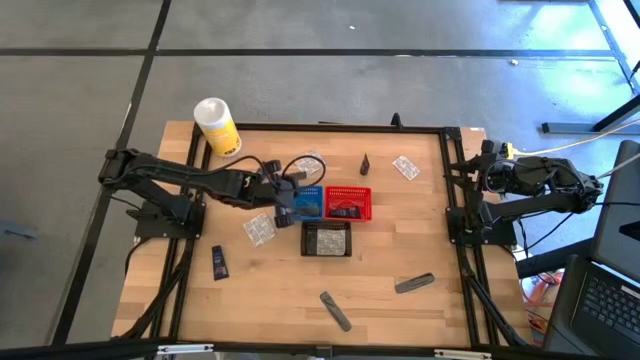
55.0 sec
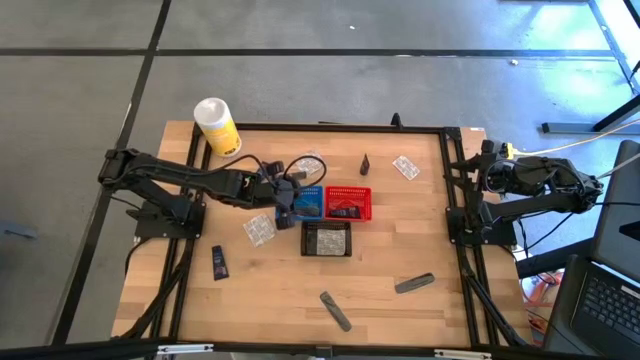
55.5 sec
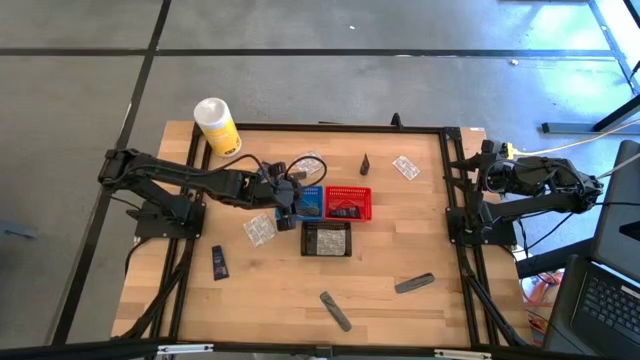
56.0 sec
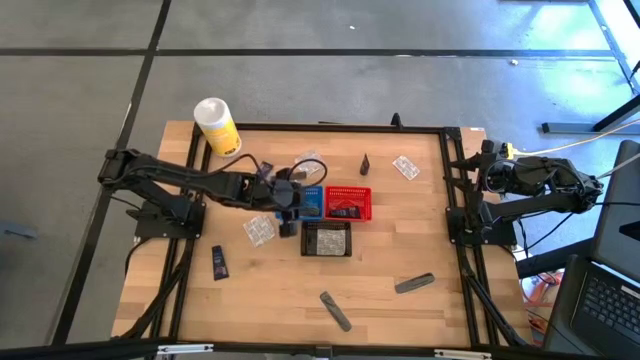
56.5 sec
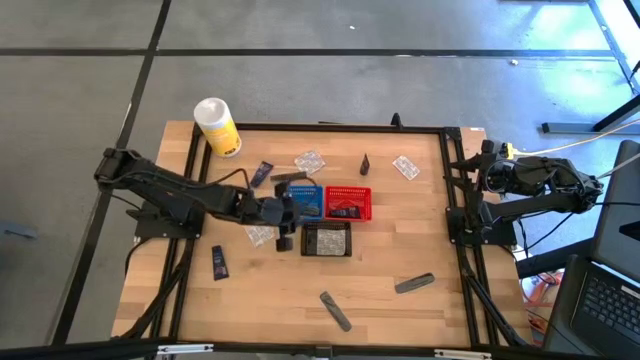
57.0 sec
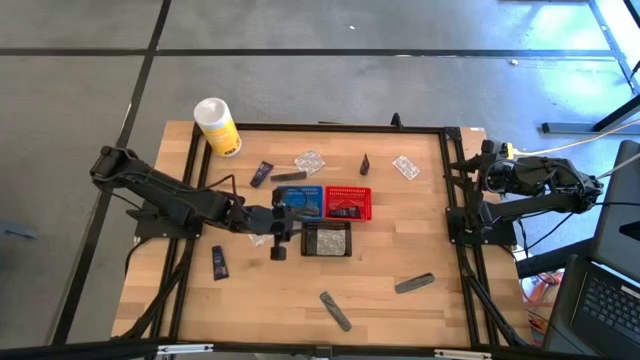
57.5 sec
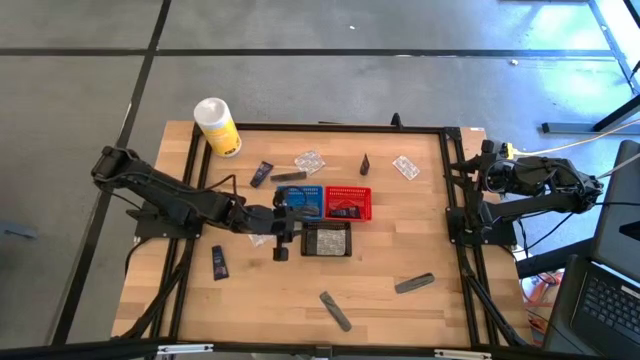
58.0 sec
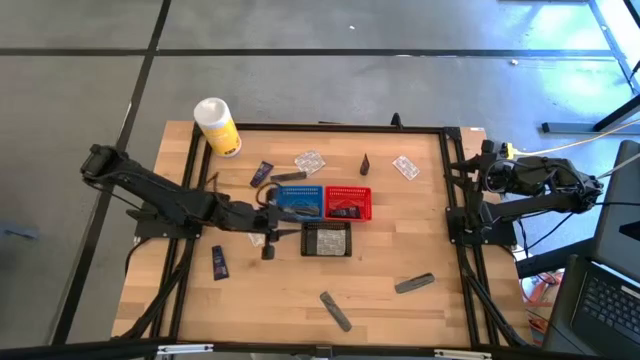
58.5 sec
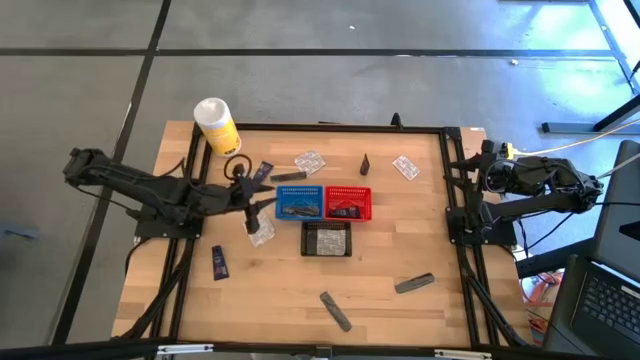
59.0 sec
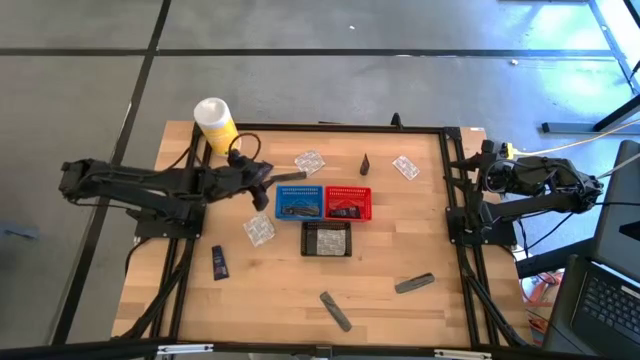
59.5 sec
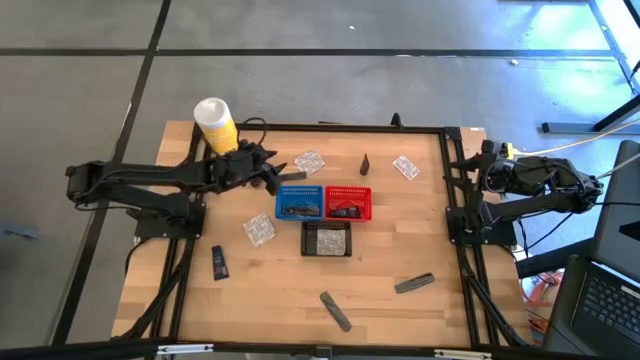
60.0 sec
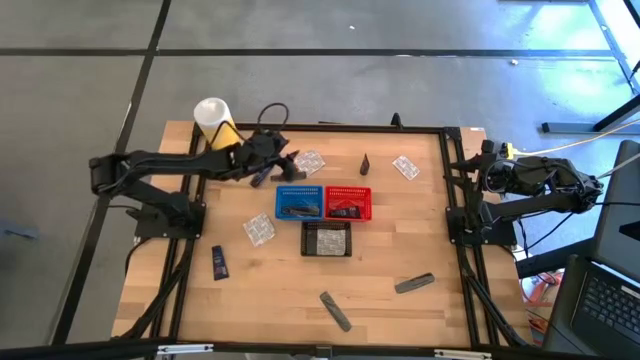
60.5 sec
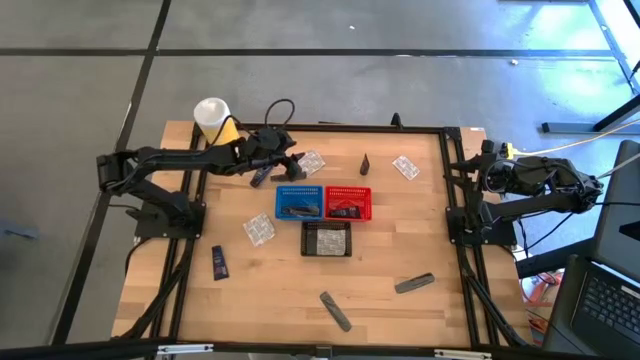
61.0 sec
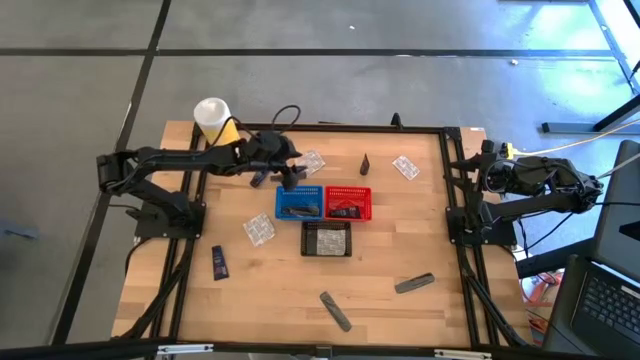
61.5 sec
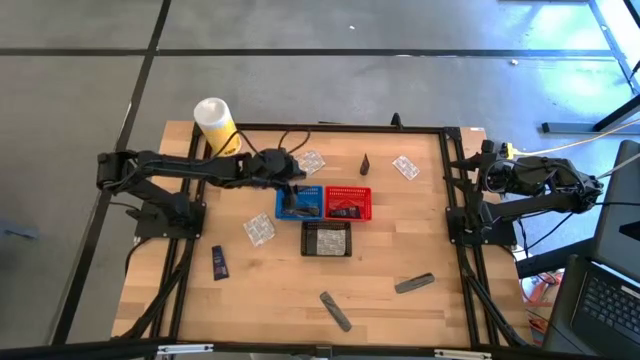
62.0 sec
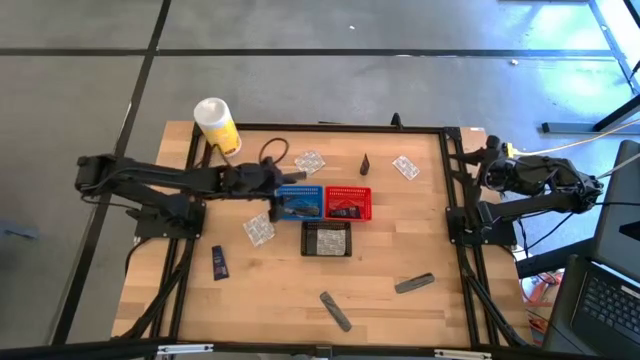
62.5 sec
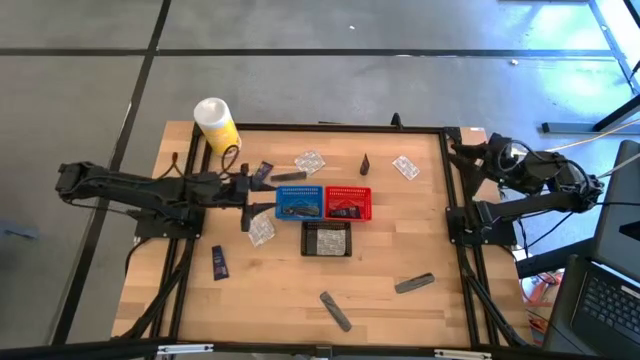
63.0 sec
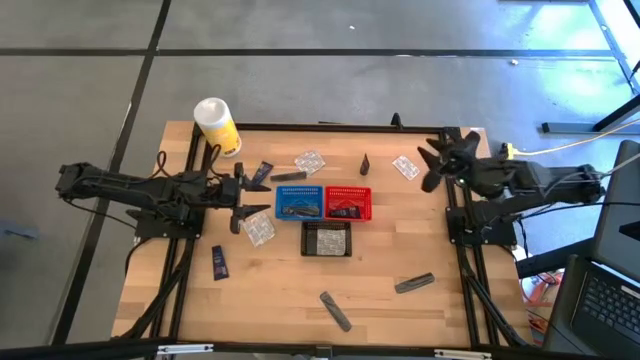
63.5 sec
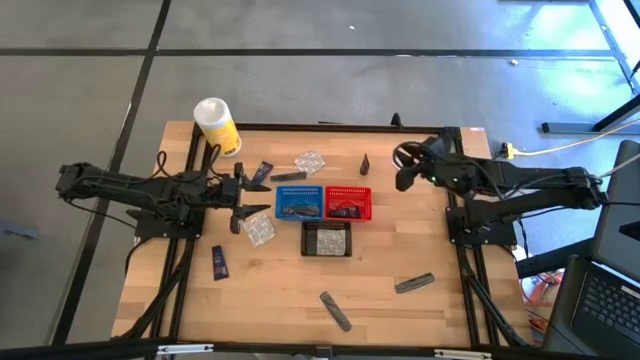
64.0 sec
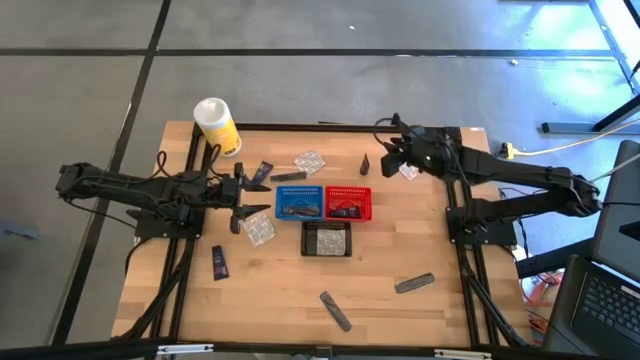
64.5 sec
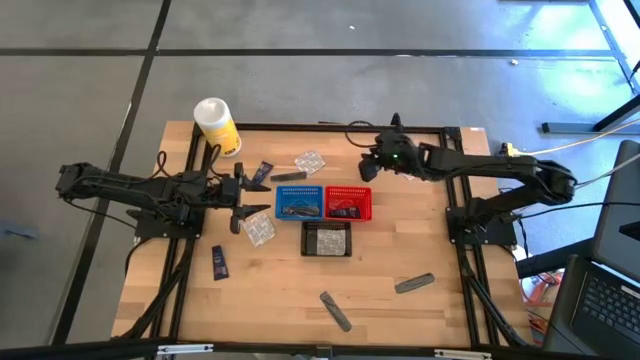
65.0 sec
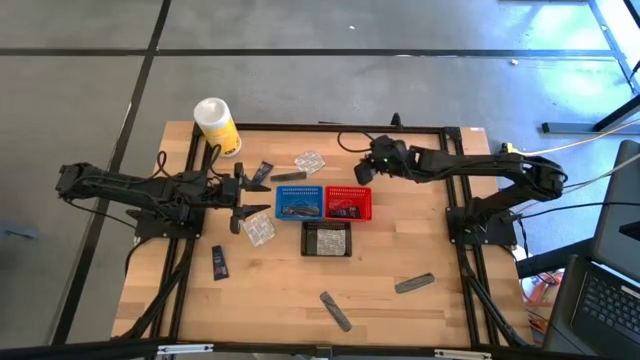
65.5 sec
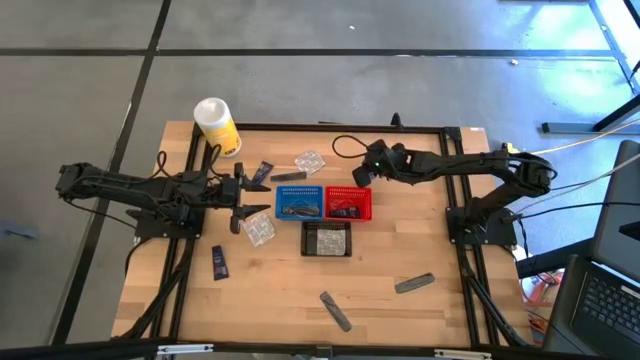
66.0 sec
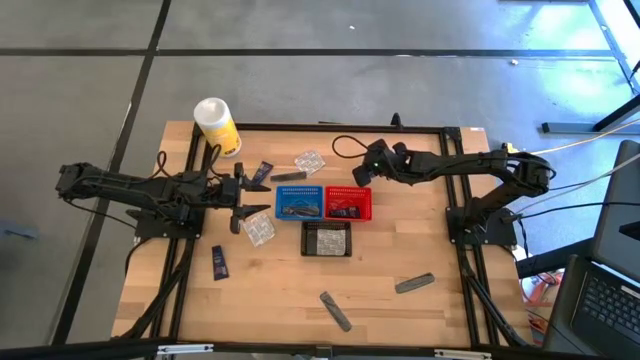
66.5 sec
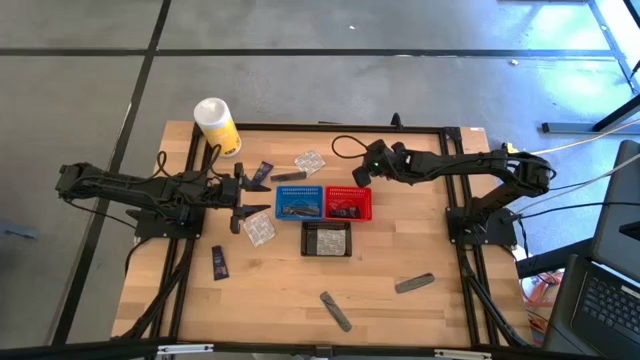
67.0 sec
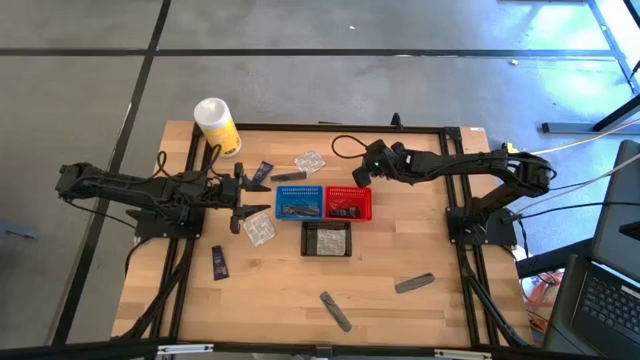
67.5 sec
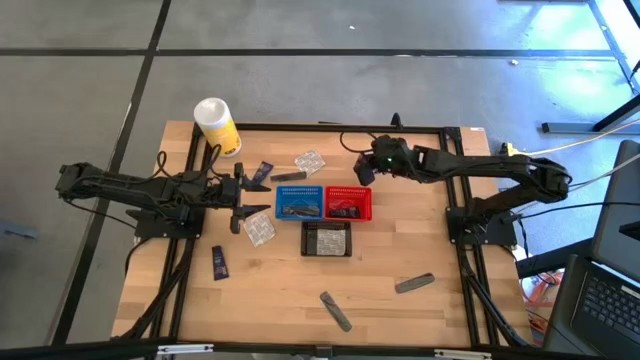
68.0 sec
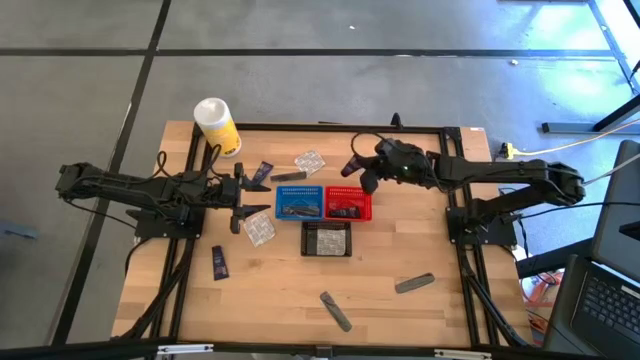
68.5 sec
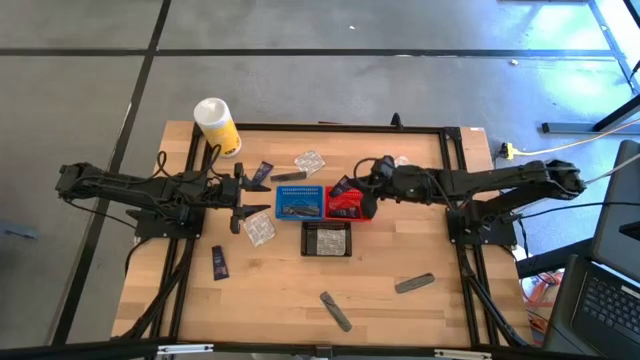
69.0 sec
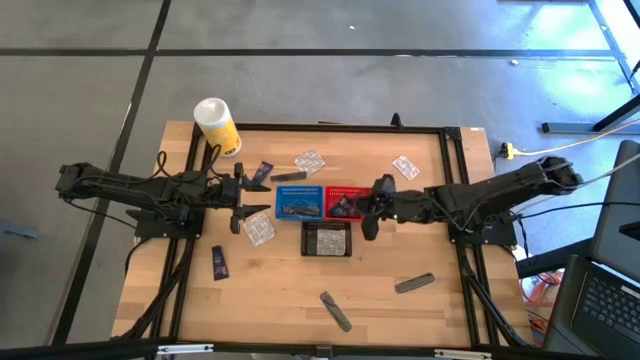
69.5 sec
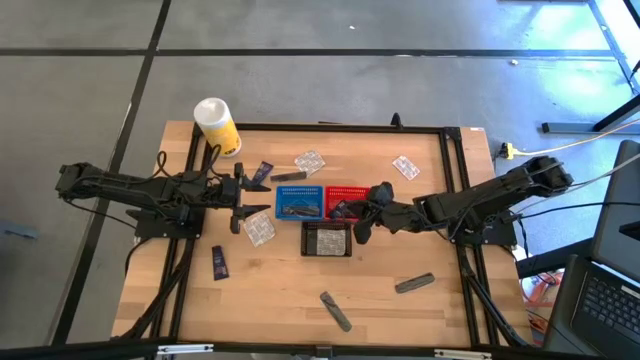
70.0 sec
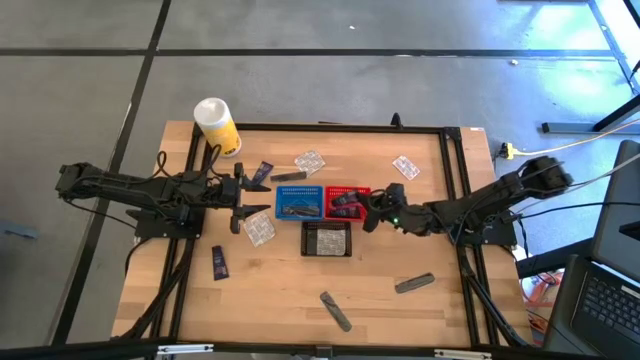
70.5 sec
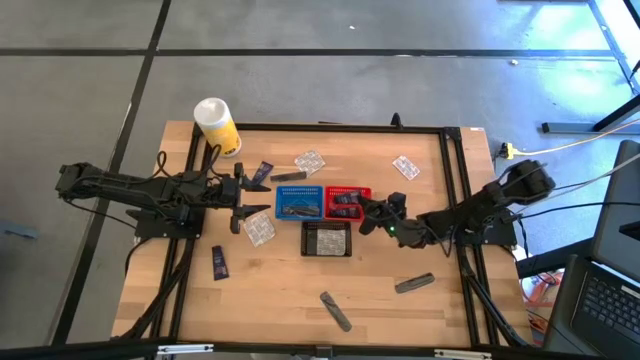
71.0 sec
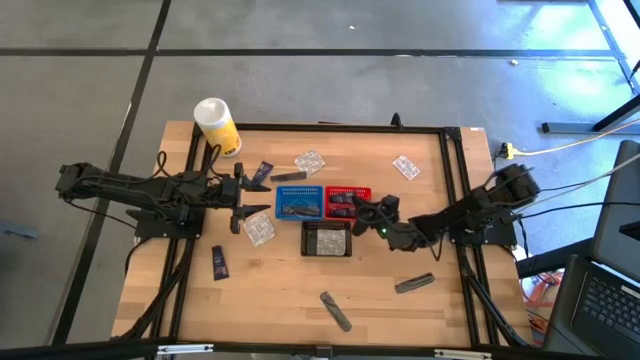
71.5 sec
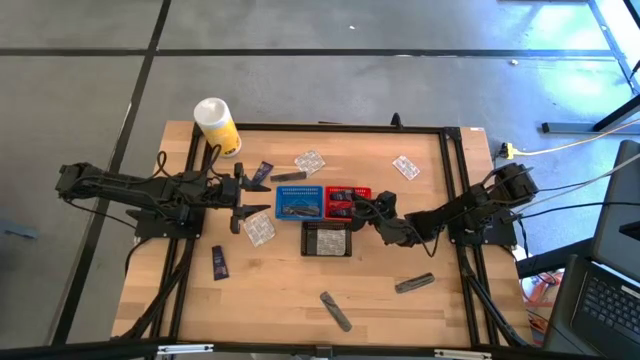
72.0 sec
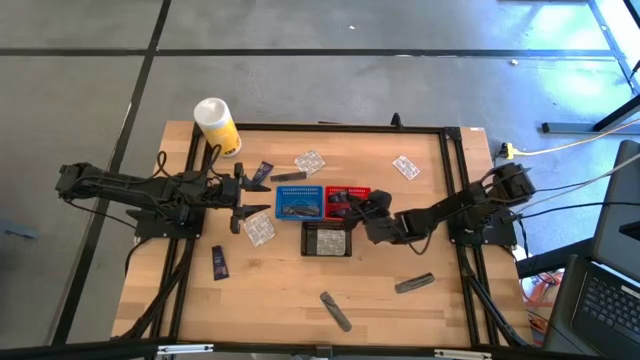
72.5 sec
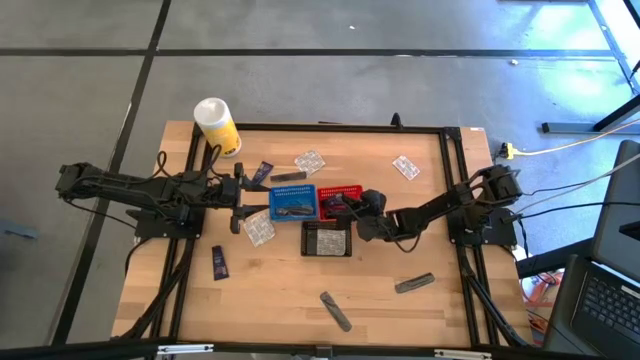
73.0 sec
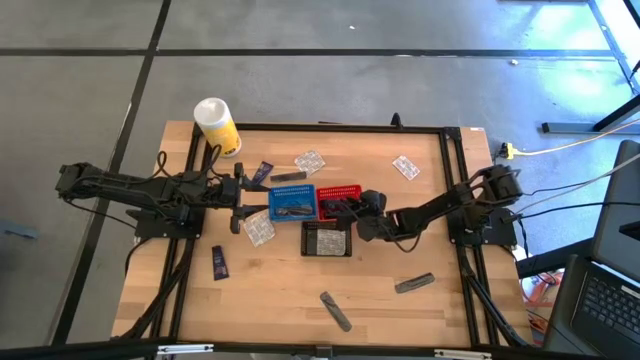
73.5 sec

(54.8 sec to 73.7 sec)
Task: Pick & Place Travel size toiletries
Put the blue shaver cream into the red bin

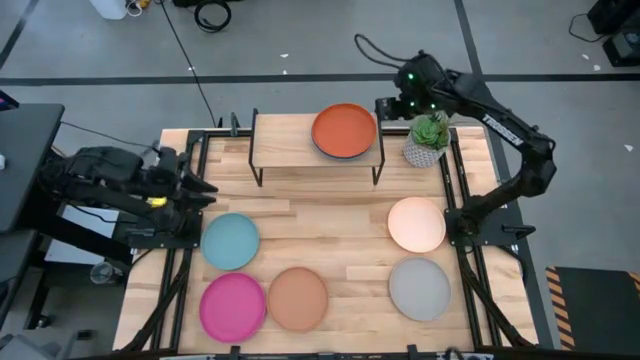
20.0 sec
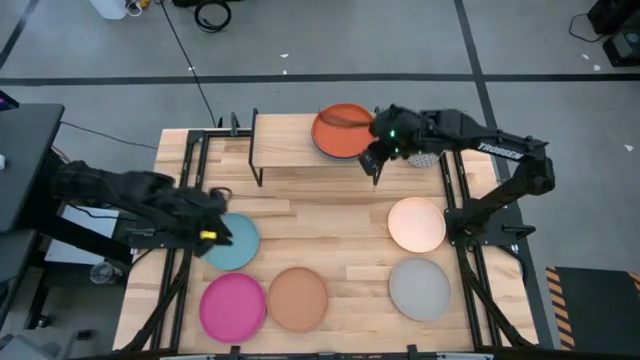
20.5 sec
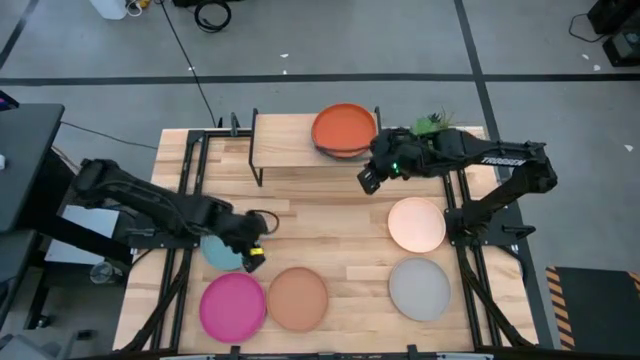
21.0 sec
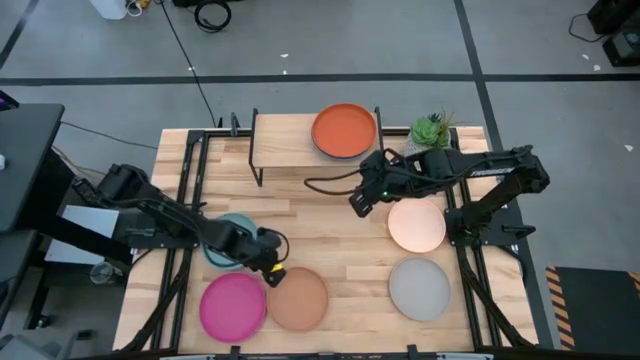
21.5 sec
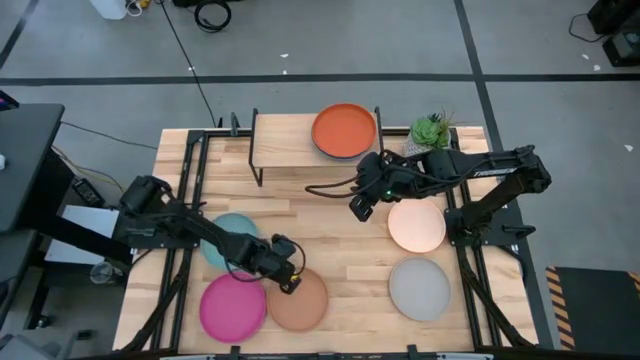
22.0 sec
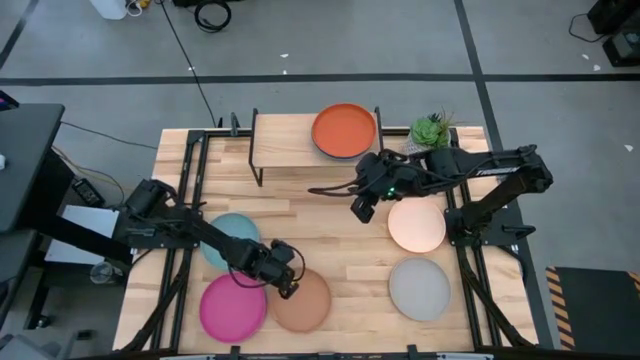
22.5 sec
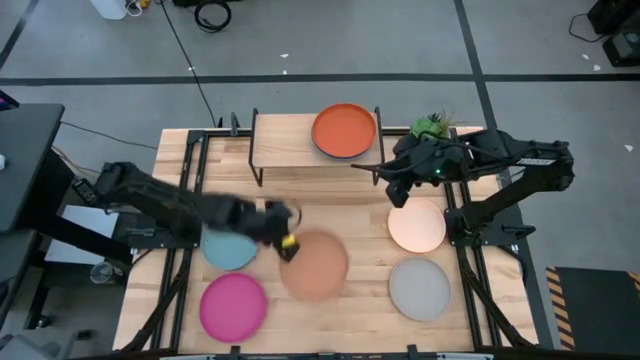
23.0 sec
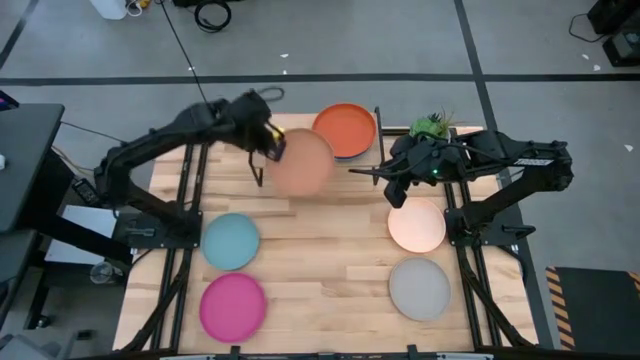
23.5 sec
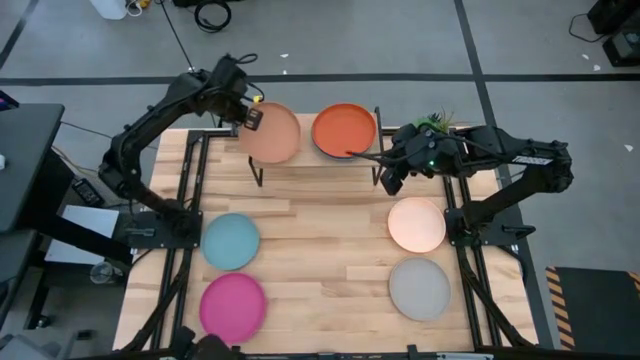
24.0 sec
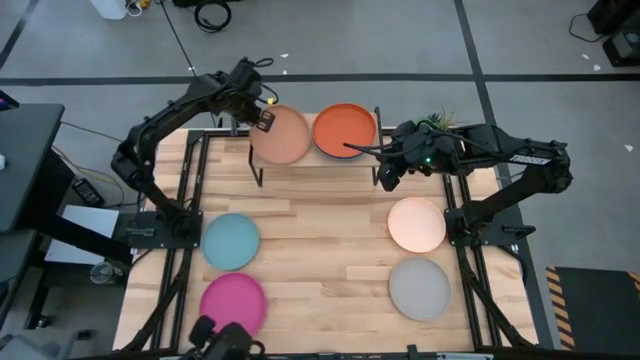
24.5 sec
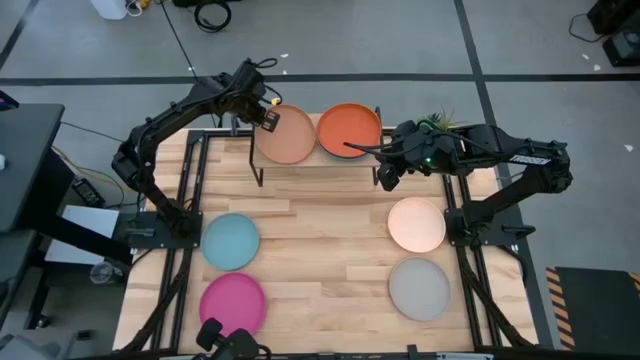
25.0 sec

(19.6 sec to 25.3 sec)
Task: Place and stack plates onto a shelf
Put the brown plate on the shelf
